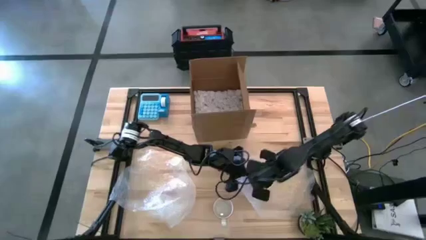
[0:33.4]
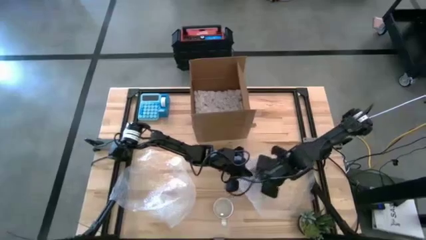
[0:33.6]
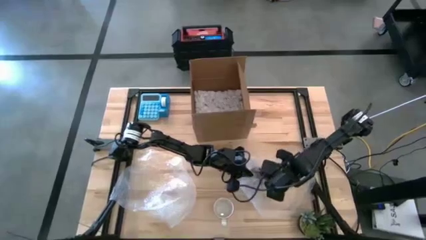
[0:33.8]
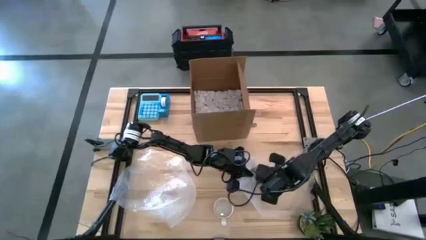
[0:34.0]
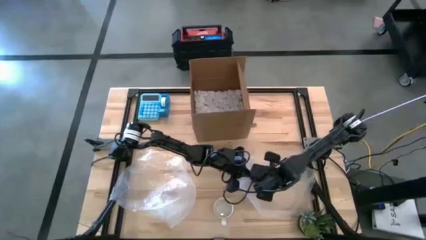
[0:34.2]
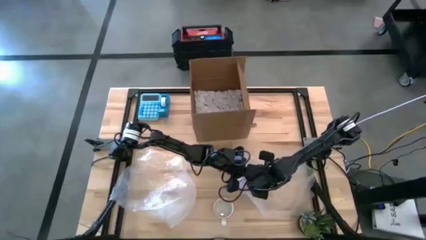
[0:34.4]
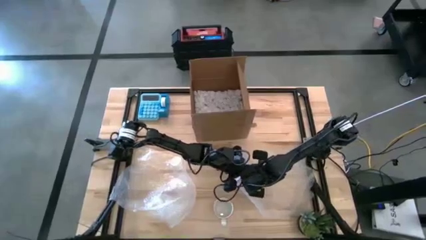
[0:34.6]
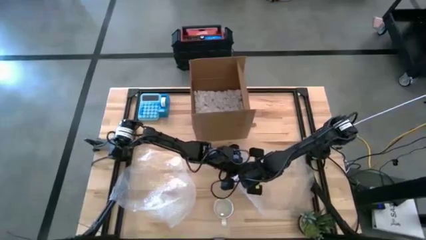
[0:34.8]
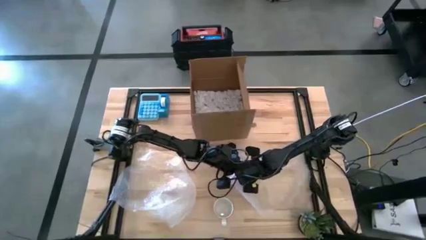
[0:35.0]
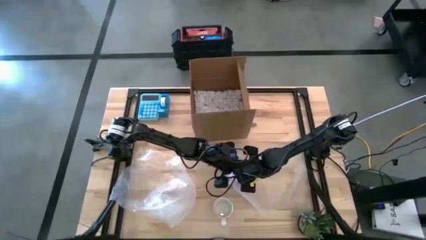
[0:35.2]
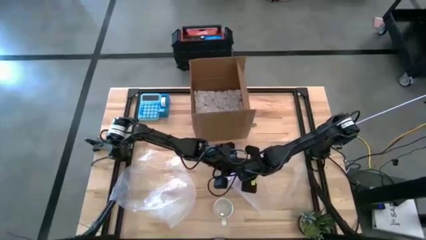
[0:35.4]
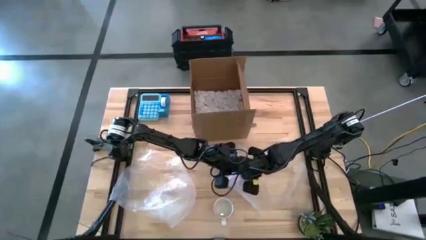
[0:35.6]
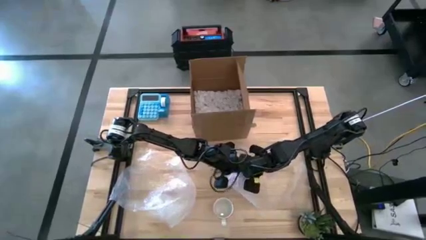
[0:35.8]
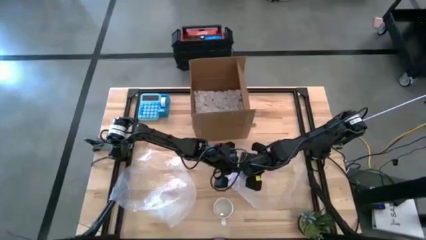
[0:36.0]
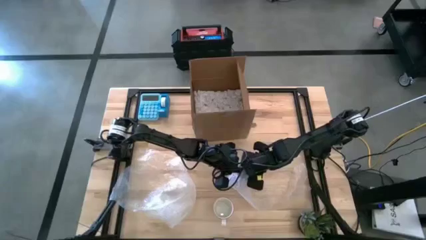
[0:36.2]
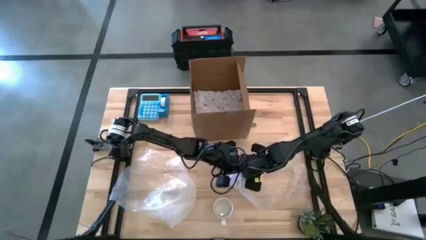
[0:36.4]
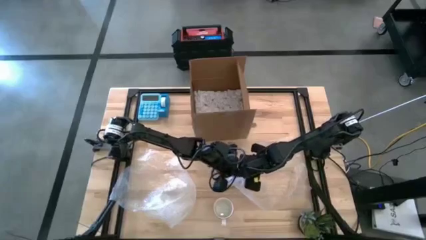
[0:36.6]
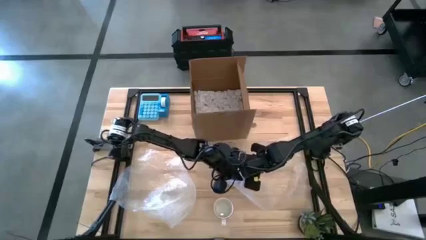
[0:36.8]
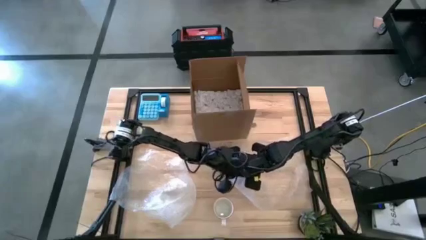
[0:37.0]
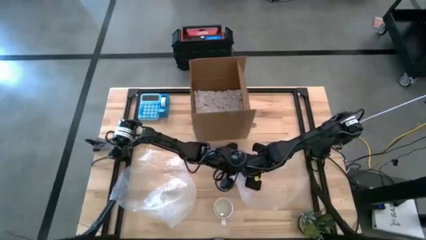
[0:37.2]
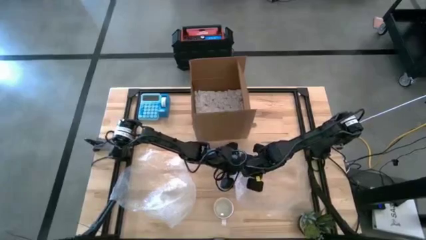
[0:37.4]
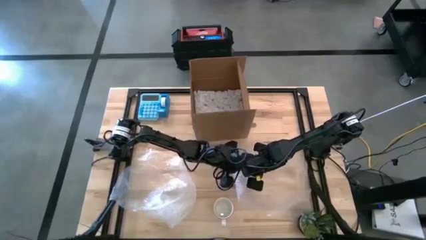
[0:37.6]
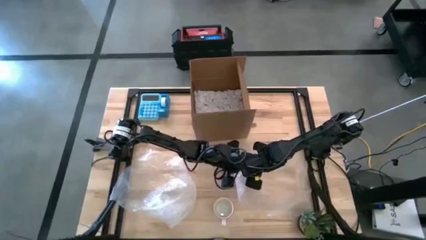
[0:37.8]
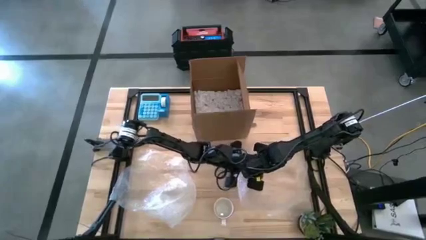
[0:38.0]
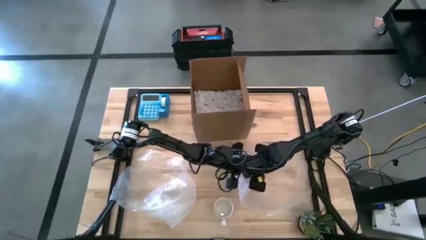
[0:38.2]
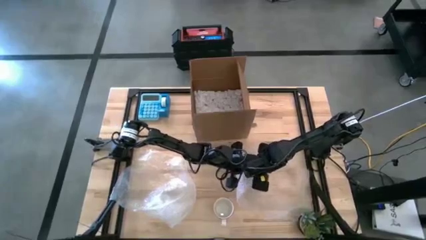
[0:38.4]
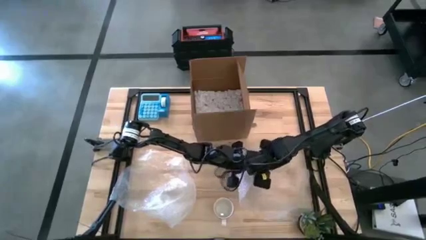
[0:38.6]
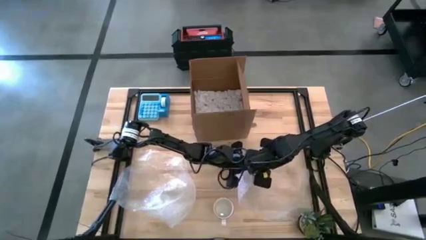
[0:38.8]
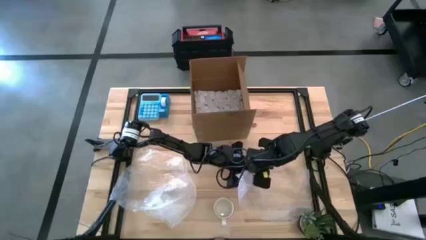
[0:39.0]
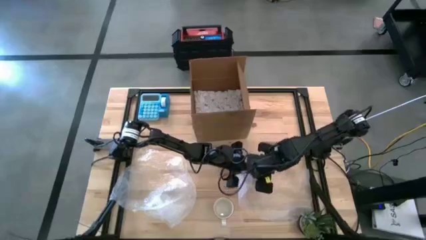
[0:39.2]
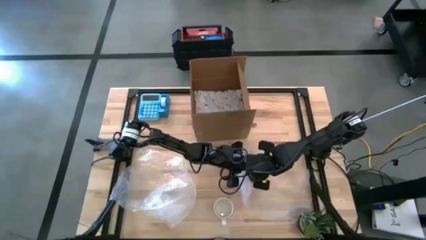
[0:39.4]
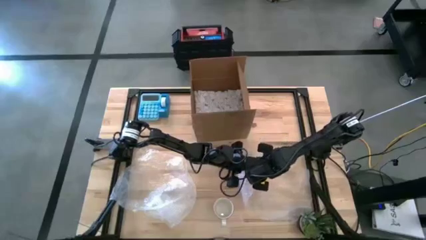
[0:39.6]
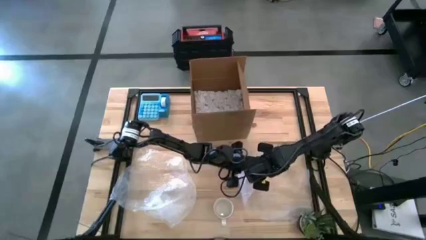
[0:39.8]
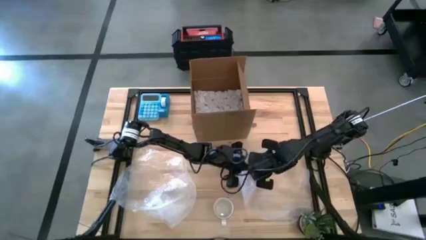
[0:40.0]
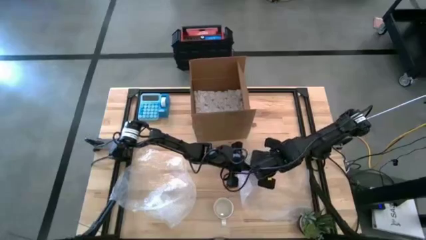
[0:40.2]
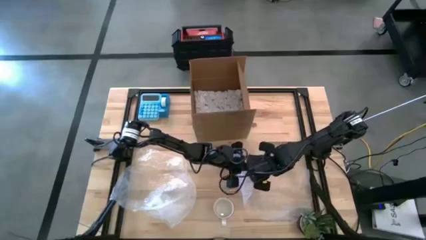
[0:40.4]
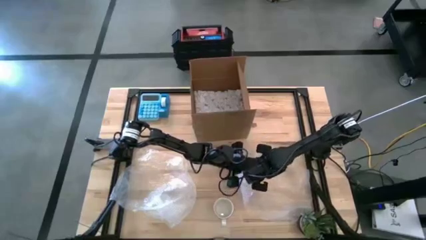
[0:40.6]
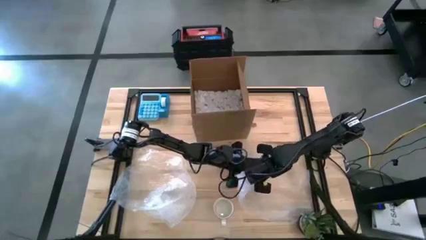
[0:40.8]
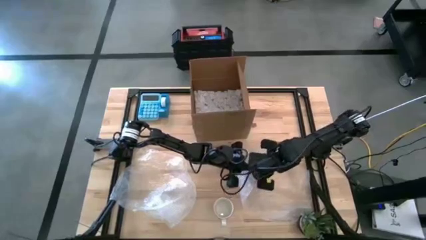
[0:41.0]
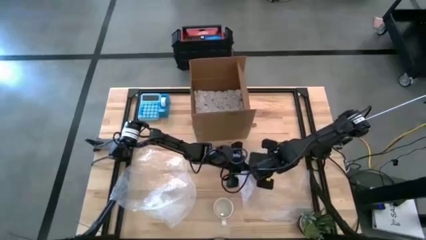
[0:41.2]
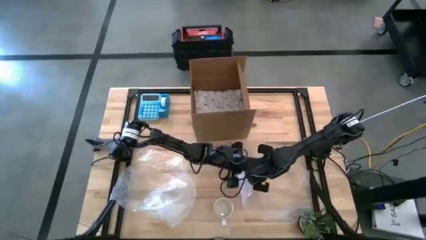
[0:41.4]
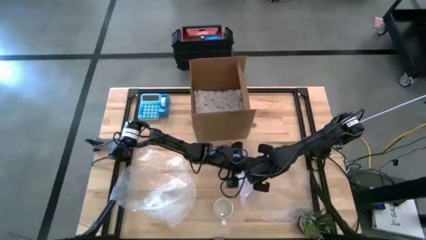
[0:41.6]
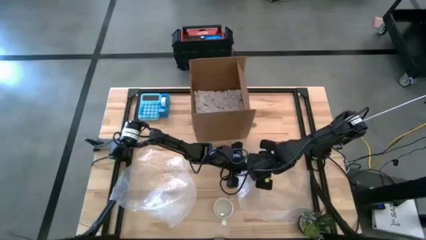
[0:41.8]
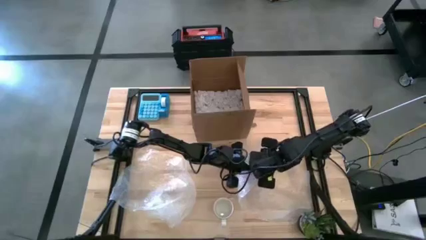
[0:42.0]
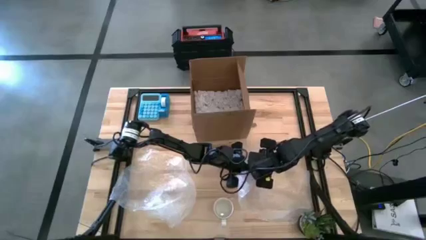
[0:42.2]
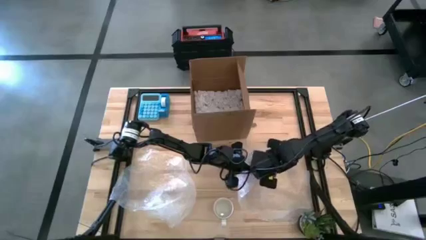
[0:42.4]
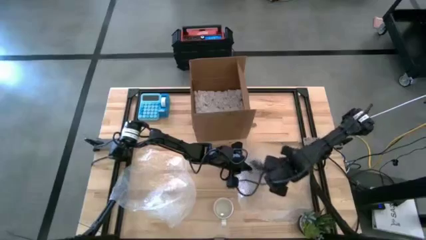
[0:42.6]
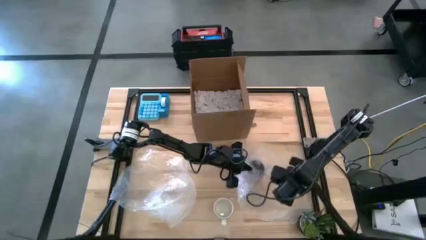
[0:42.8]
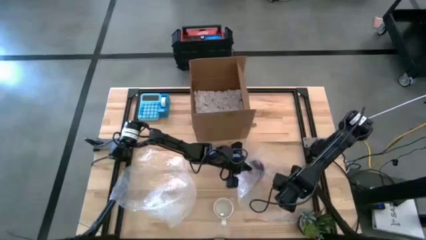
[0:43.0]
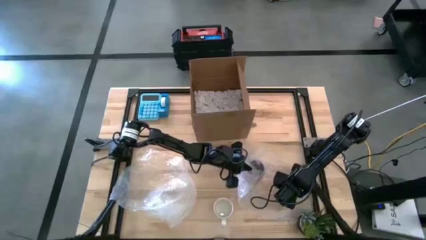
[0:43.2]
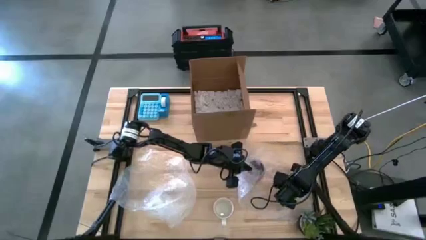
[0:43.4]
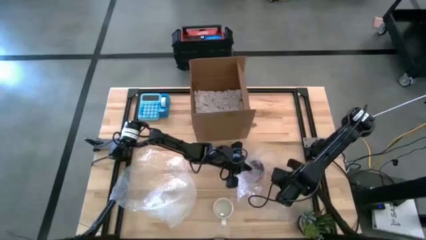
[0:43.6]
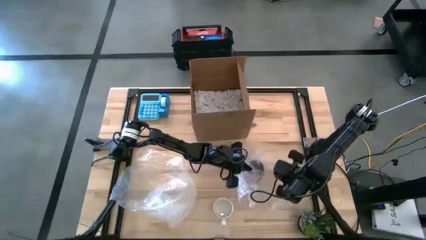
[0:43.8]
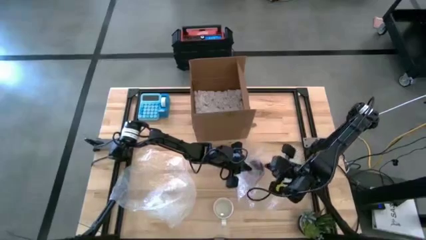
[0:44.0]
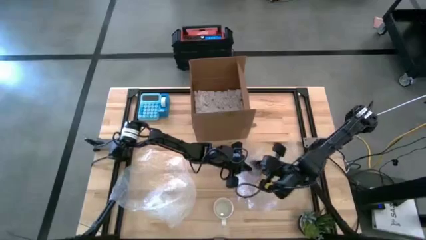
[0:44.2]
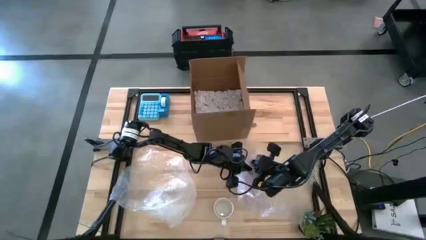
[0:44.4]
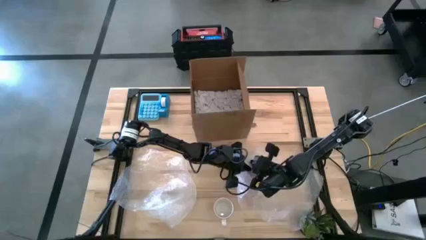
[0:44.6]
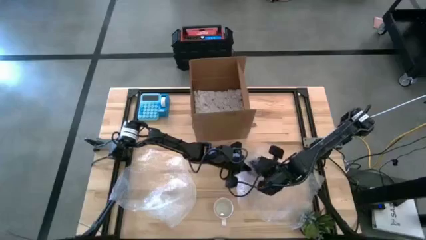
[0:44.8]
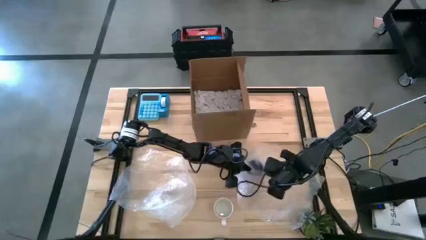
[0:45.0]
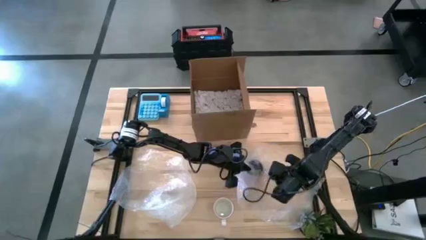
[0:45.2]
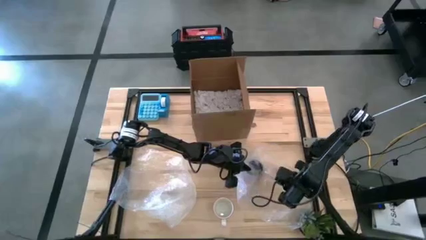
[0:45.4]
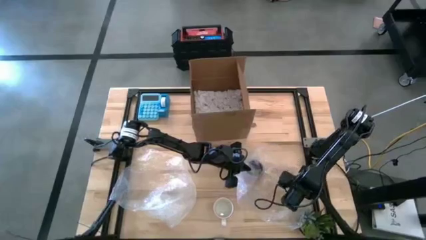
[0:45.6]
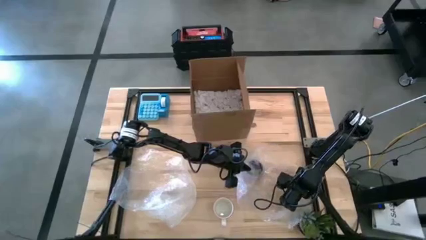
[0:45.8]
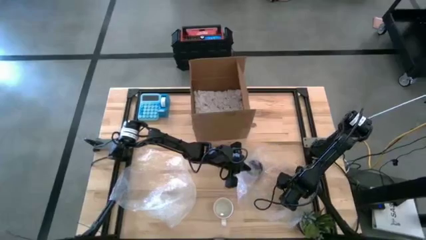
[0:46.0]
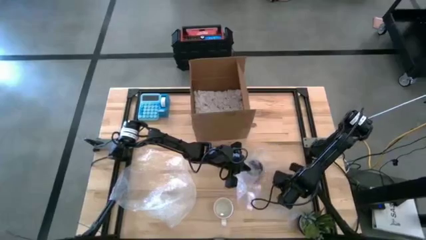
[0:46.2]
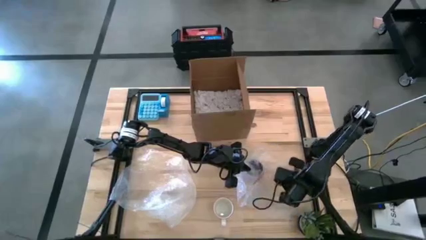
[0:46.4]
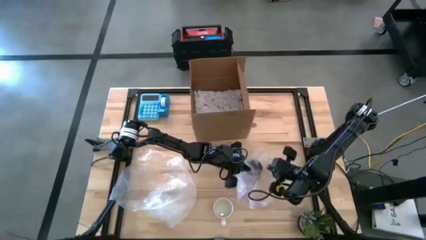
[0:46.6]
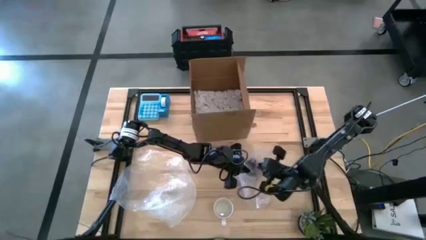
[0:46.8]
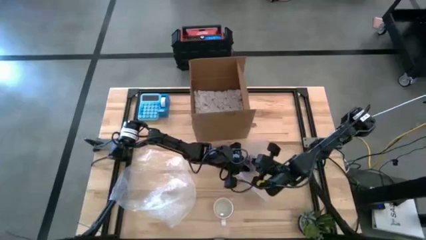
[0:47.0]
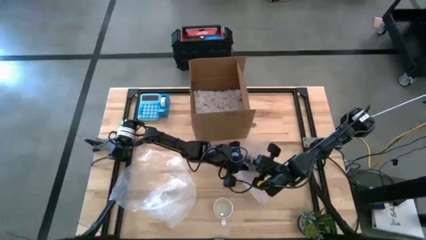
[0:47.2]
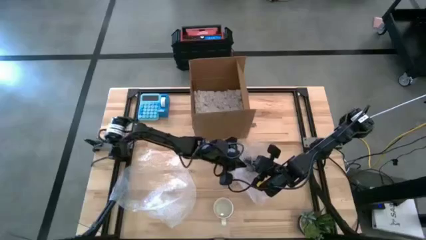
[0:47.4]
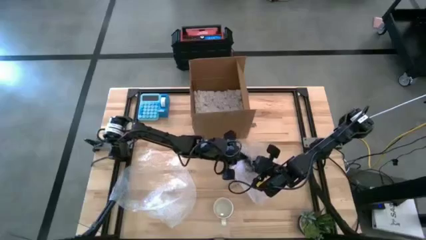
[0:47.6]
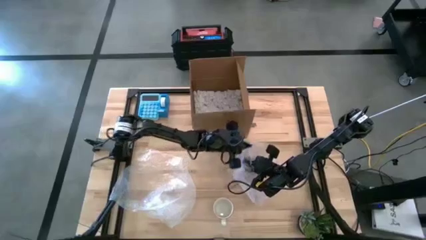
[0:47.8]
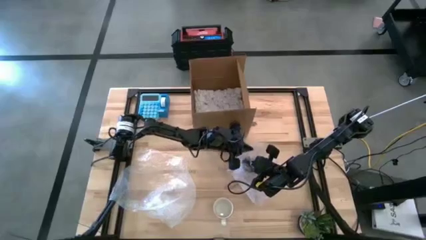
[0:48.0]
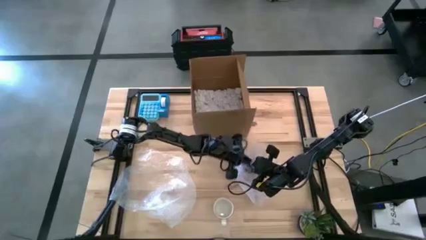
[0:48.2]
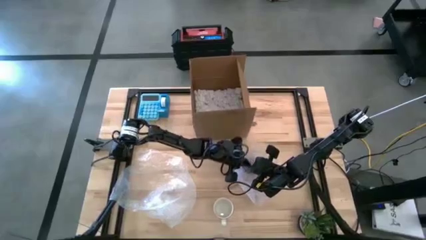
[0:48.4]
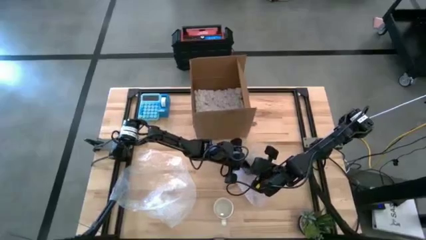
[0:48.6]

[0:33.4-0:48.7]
Task: wrap mug
Wrap the purple mug using the right bubble wrap
